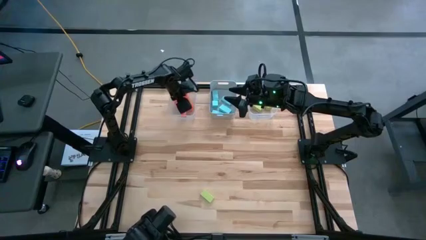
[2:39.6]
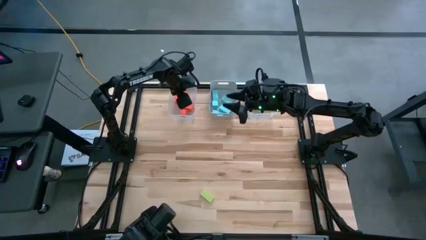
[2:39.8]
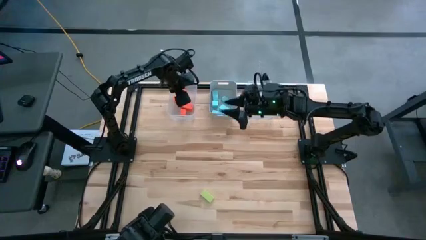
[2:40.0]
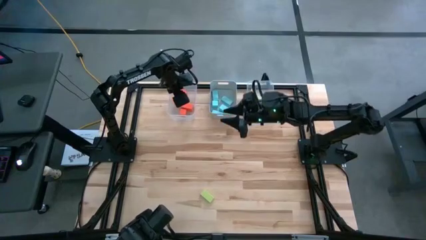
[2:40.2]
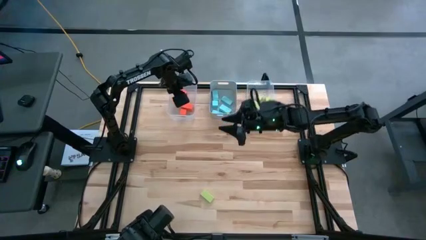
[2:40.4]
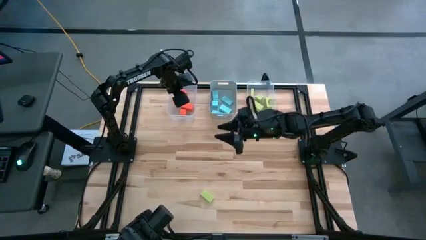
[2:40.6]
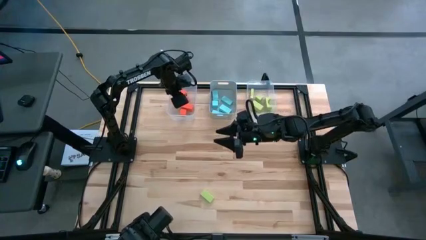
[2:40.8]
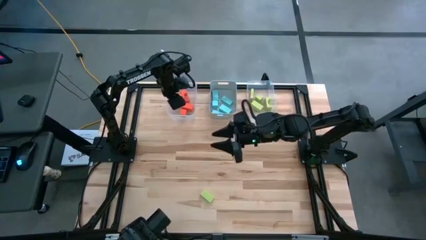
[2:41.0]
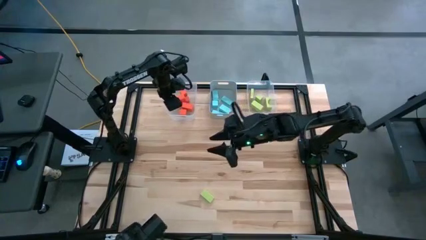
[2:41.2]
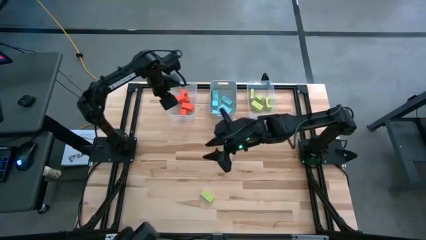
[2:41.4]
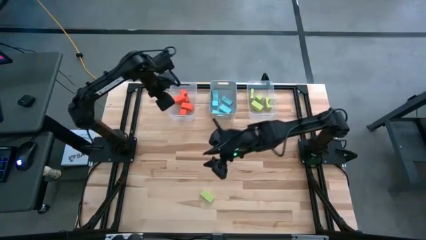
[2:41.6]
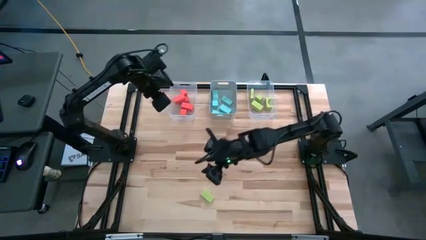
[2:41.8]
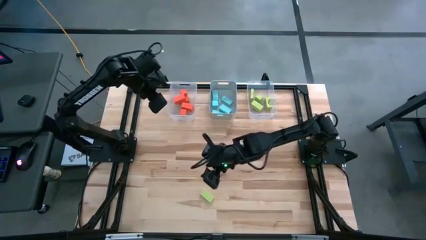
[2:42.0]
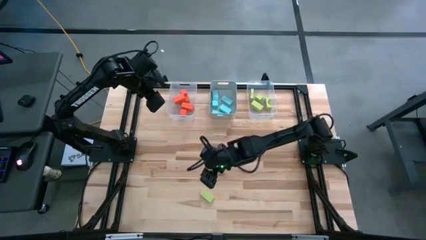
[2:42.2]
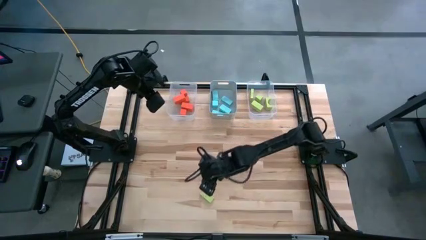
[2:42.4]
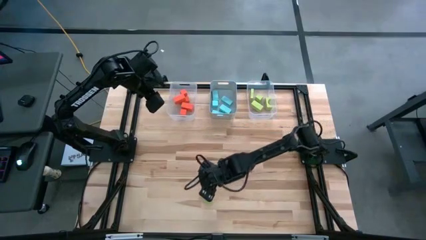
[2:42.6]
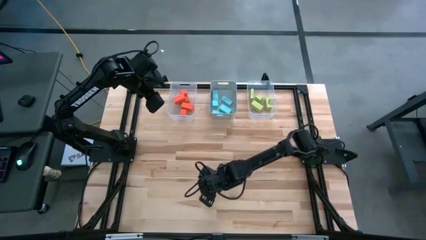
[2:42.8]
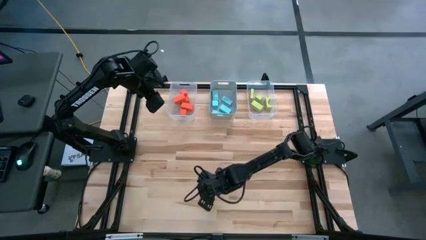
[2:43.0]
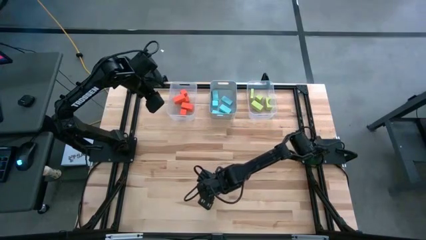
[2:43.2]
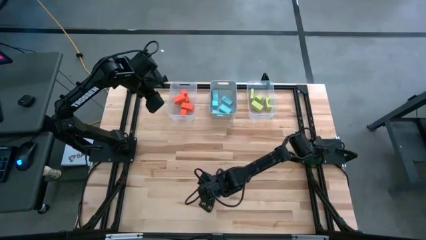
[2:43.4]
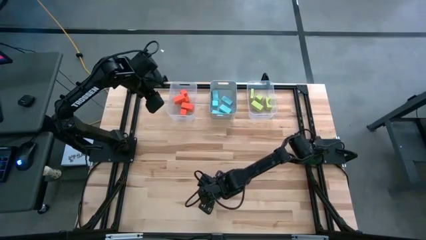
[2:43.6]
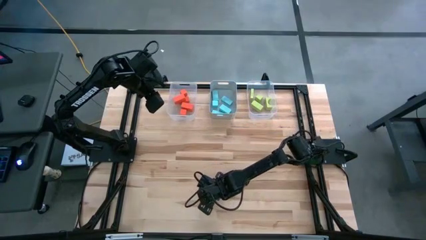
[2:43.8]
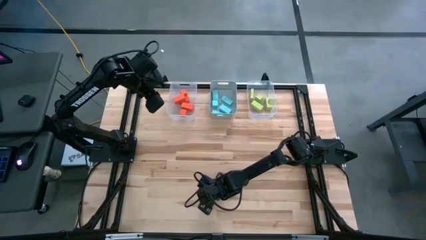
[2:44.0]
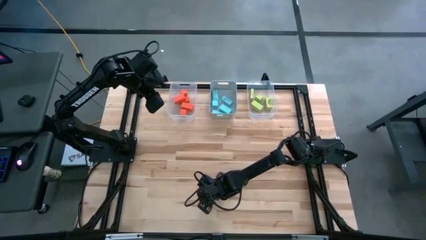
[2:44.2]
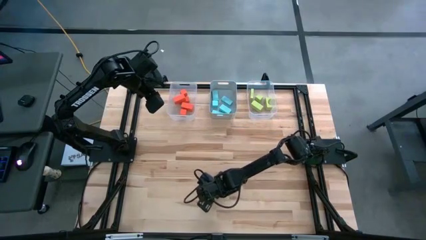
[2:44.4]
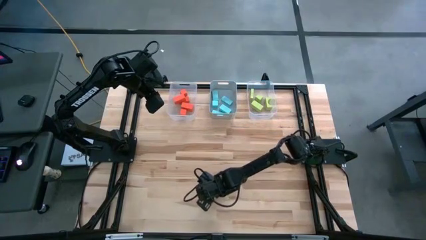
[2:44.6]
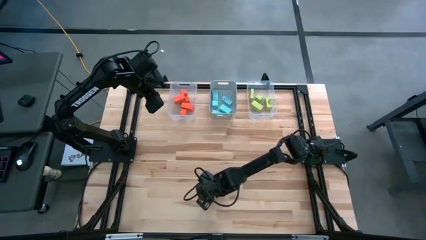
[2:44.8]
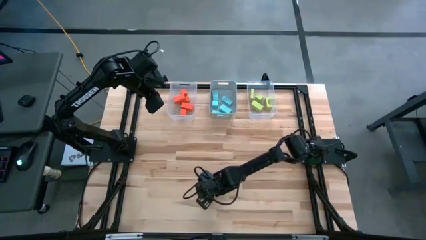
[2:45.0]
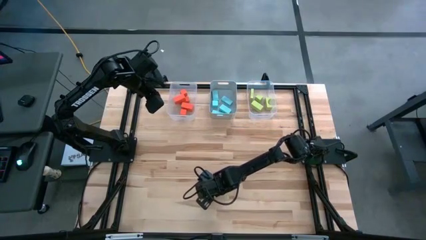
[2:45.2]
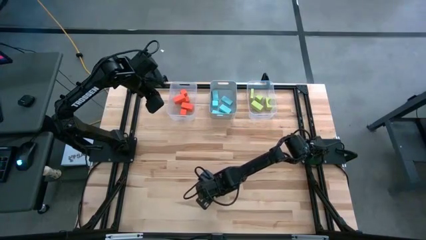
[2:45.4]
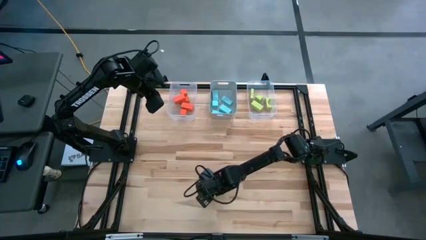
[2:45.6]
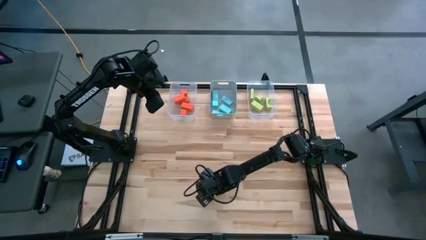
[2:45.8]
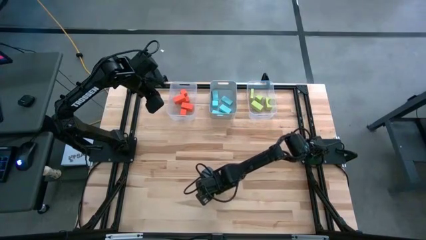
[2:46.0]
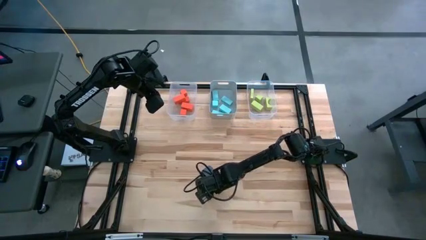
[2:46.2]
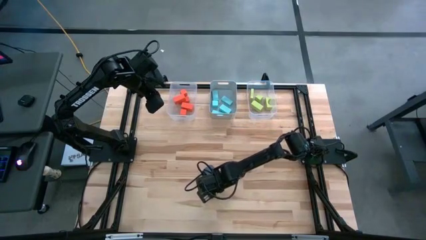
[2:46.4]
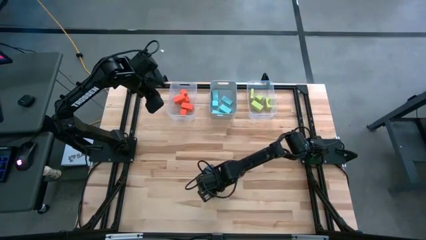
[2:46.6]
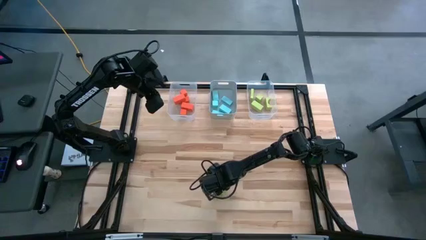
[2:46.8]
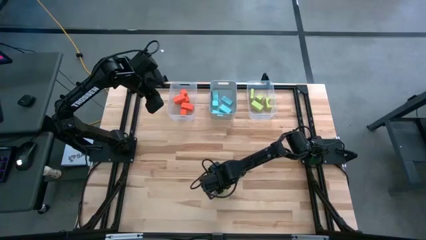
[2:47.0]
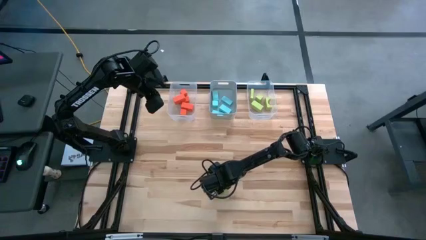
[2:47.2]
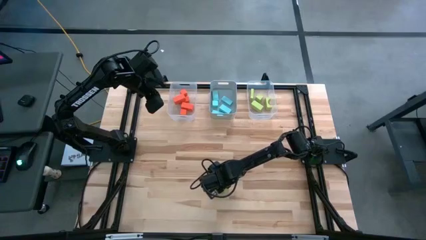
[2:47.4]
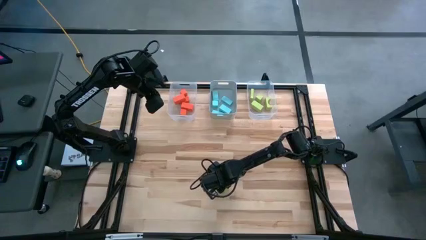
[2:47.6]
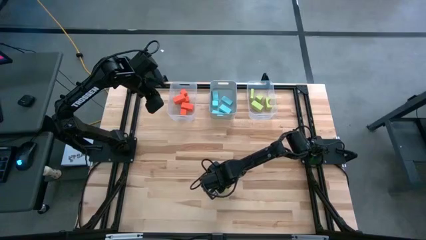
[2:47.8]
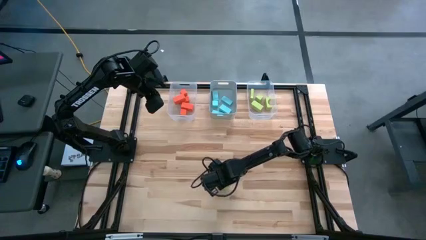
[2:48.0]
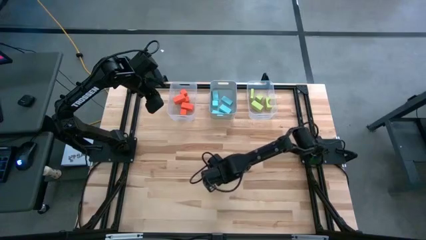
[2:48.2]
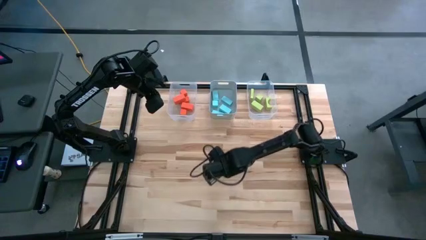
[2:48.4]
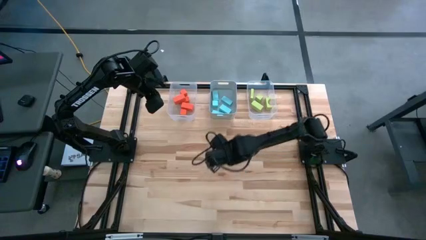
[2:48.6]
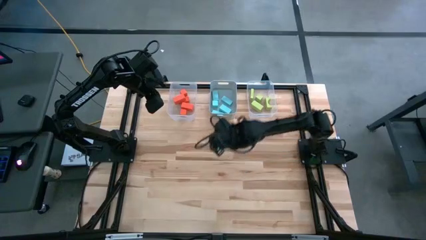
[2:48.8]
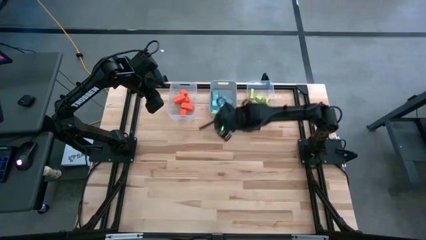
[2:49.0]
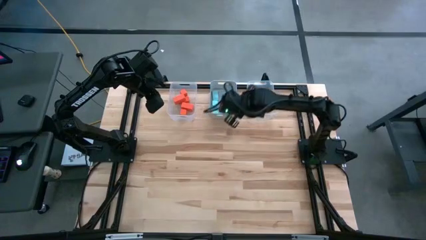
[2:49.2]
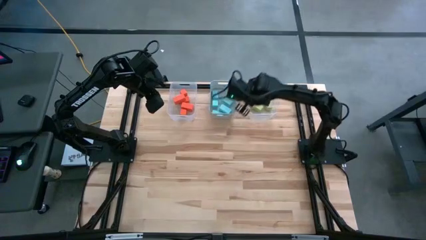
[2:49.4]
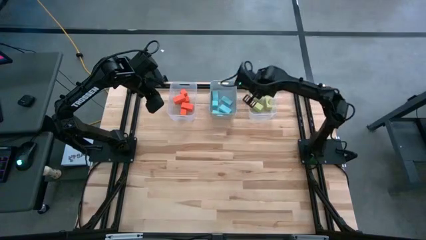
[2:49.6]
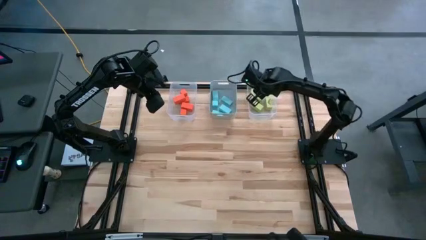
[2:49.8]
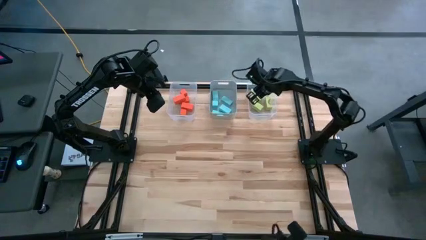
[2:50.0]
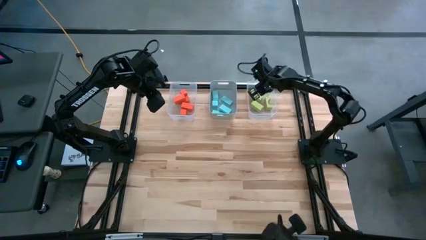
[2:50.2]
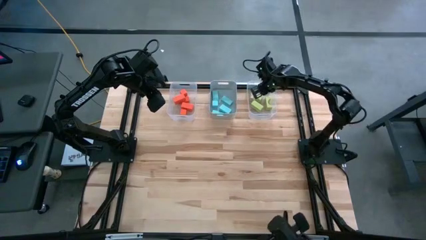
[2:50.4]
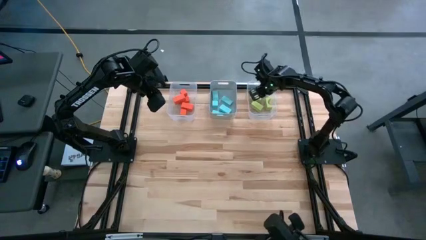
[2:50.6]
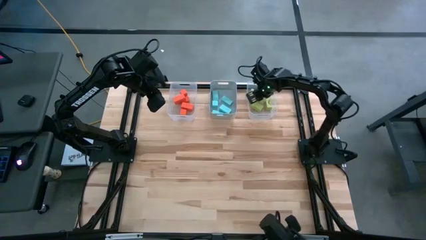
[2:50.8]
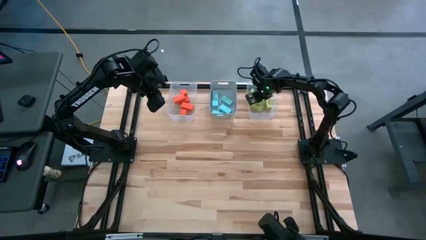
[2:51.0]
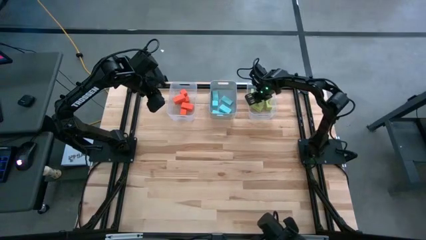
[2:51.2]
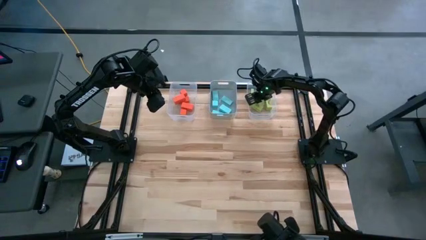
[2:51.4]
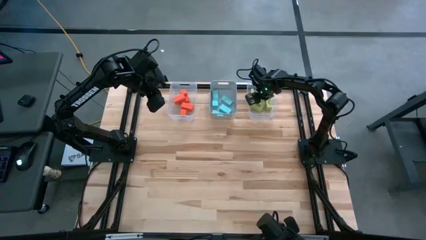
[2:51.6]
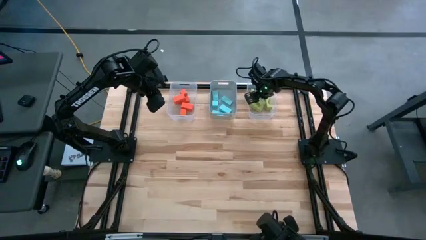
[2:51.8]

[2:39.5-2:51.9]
Task: Sort & place blocks by color
Put the green block into the right transparent bin

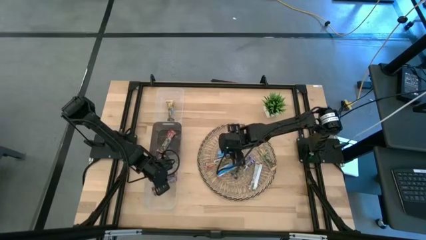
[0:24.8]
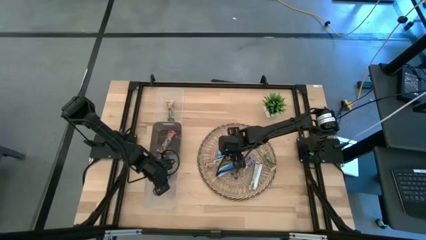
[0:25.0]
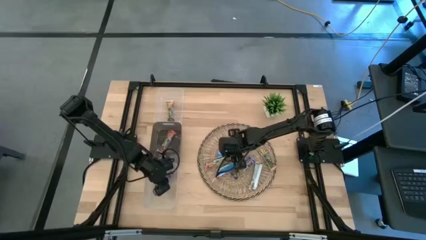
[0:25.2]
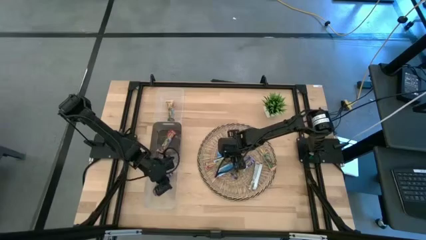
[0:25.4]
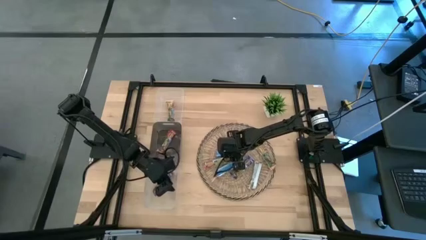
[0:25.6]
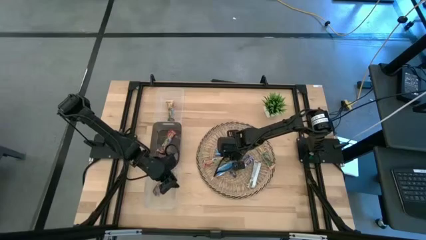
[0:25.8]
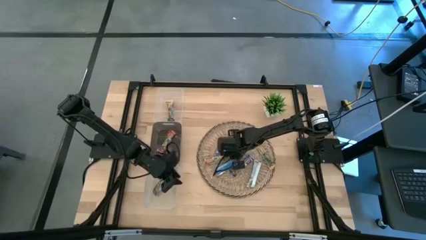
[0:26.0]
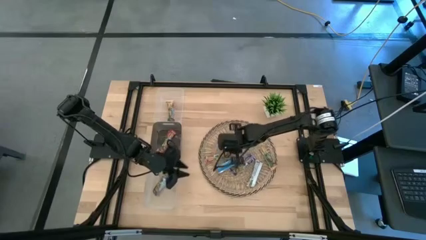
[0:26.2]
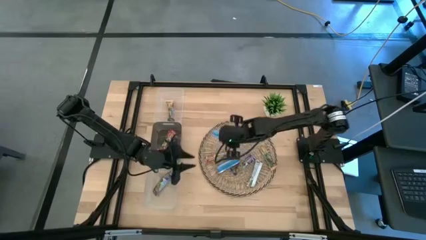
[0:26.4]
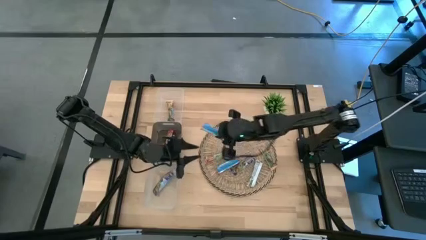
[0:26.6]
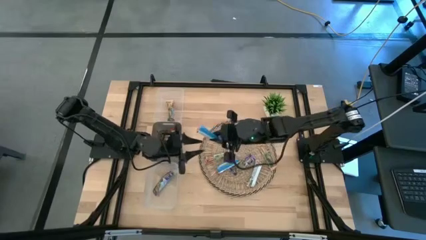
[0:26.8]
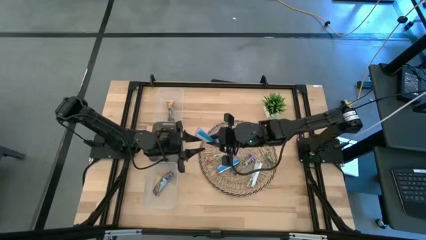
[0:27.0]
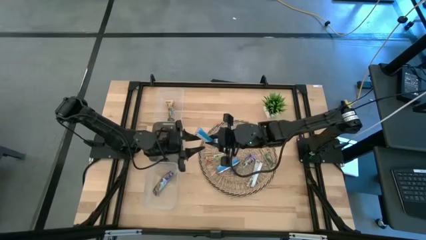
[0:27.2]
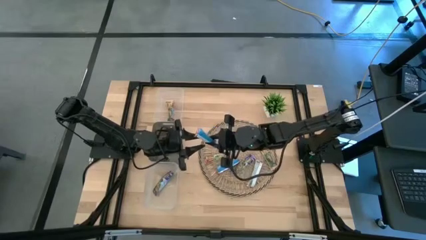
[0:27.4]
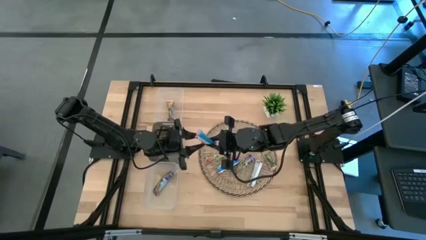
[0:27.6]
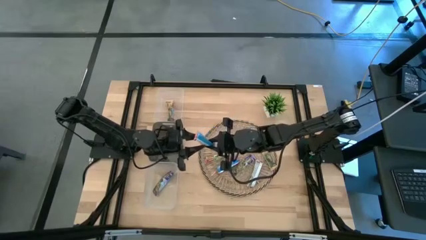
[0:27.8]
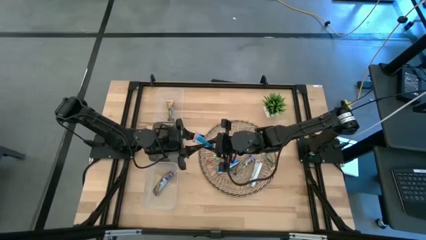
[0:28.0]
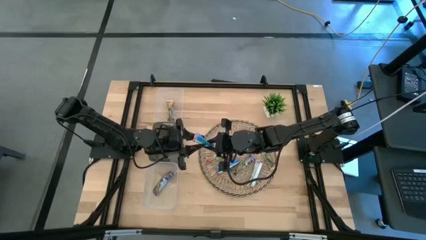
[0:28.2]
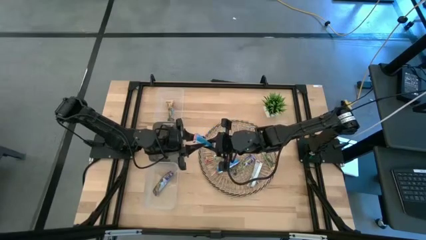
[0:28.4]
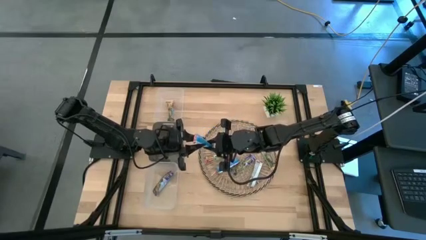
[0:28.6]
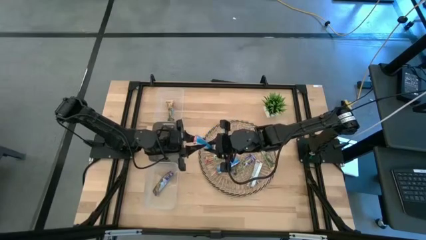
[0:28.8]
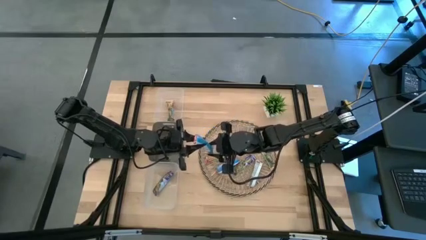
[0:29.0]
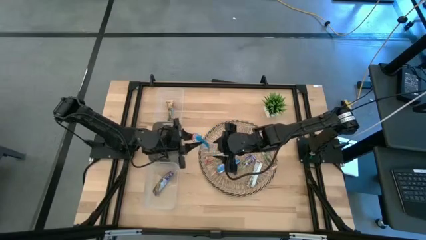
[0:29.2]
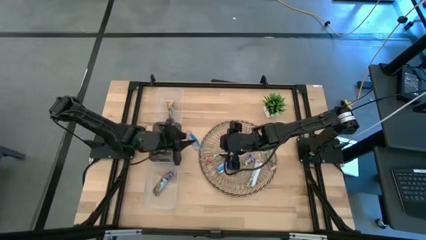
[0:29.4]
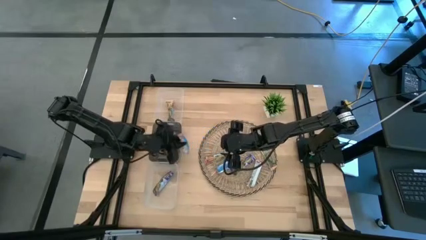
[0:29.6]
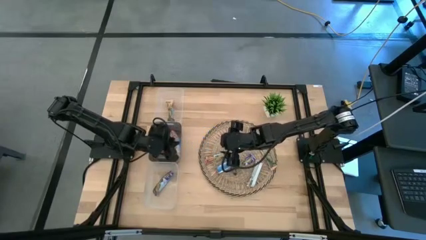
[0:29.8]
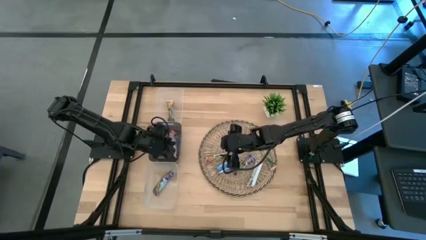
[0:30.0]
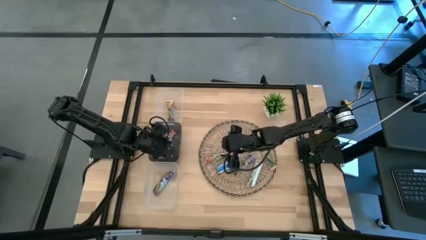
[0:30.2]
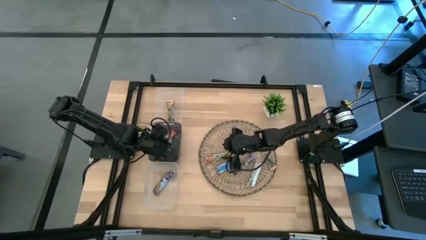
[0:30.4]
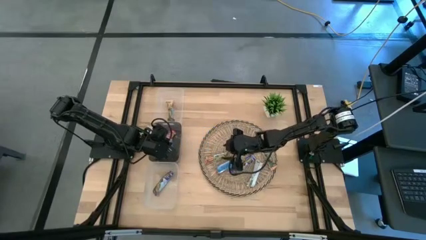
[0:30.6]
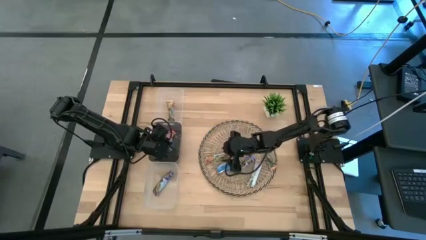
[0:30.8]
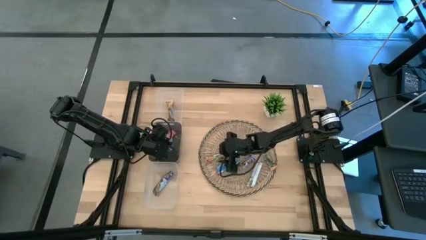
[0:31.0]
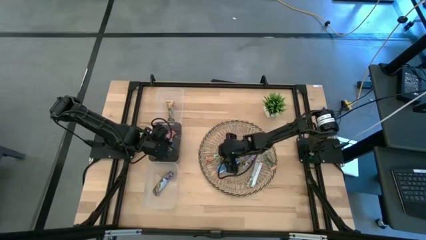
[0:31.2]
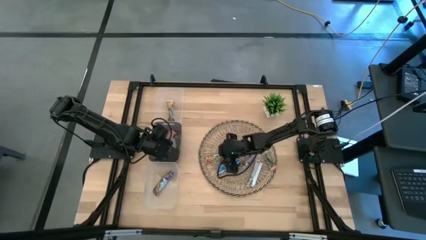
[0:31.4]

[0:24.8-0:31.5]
Task: Pick and place Granola Bars by type
Put the red granola bar into the black bin
